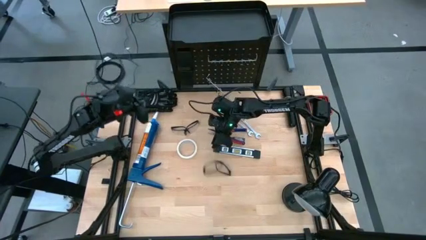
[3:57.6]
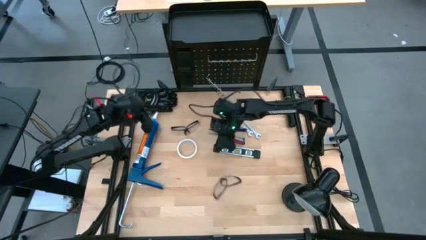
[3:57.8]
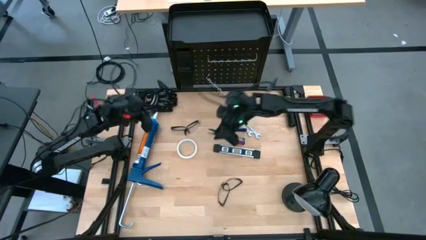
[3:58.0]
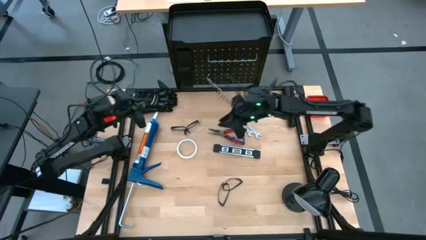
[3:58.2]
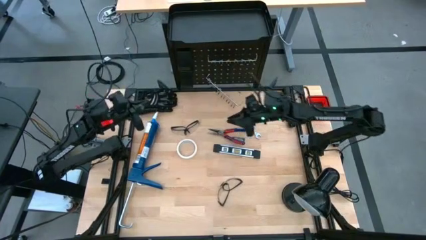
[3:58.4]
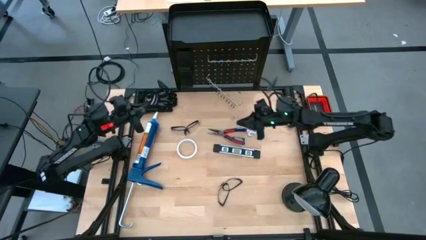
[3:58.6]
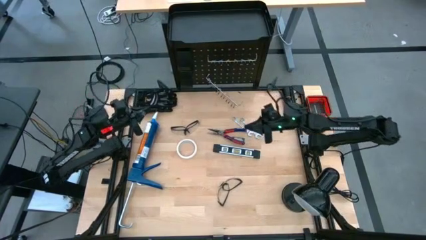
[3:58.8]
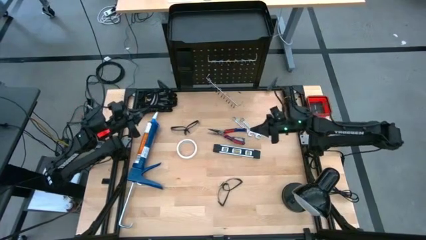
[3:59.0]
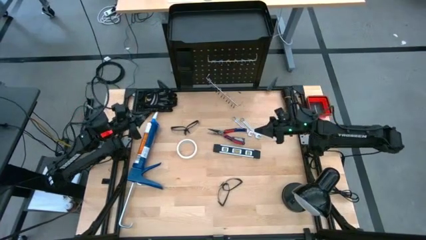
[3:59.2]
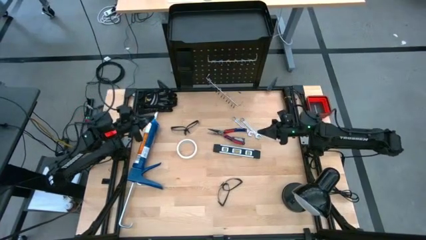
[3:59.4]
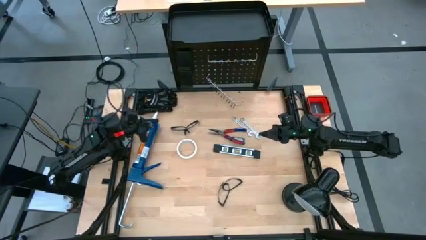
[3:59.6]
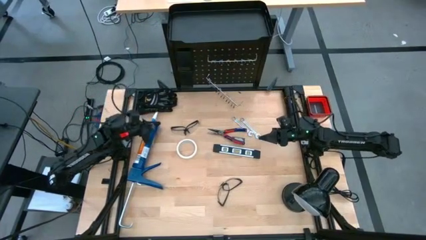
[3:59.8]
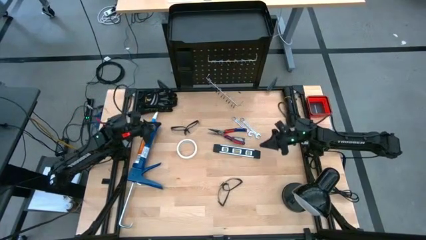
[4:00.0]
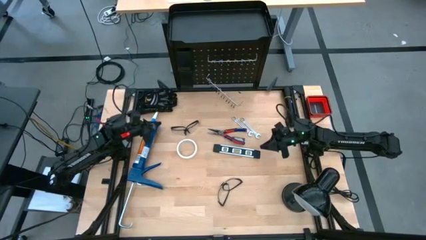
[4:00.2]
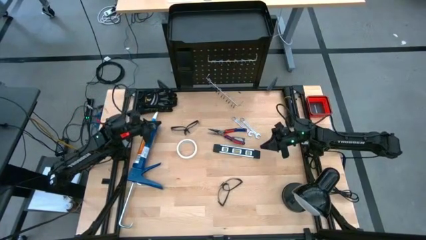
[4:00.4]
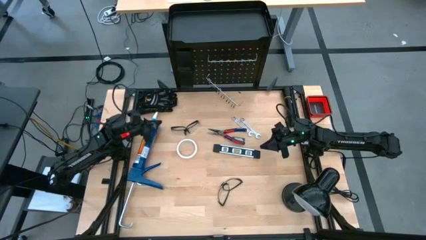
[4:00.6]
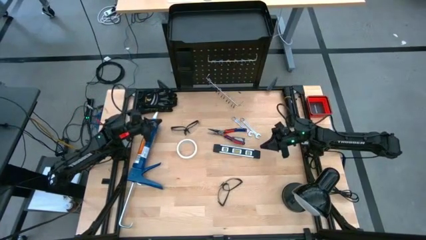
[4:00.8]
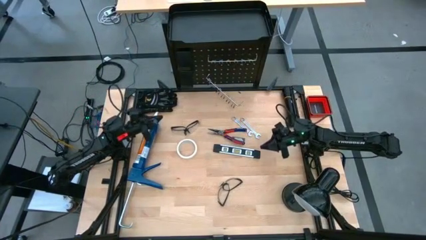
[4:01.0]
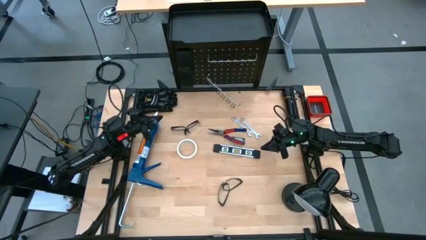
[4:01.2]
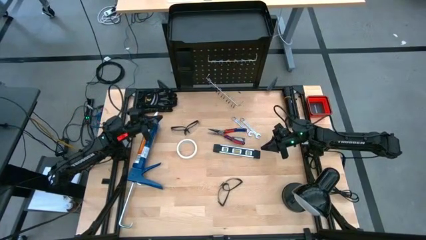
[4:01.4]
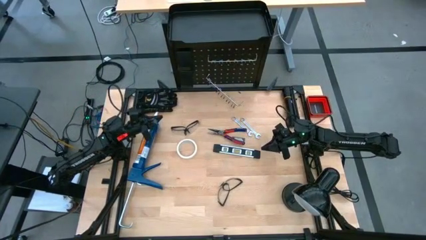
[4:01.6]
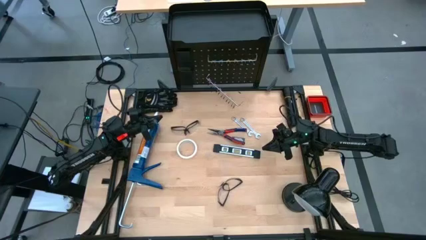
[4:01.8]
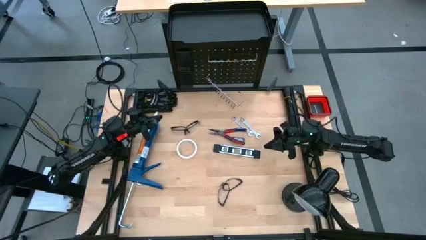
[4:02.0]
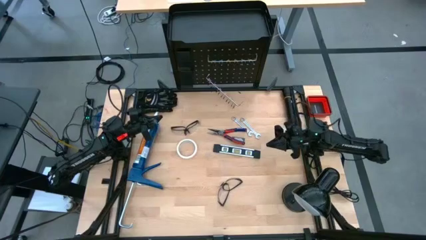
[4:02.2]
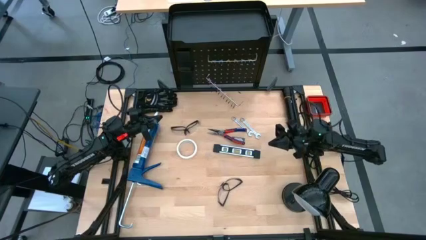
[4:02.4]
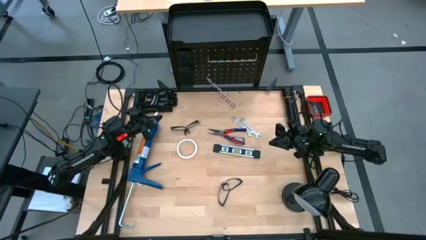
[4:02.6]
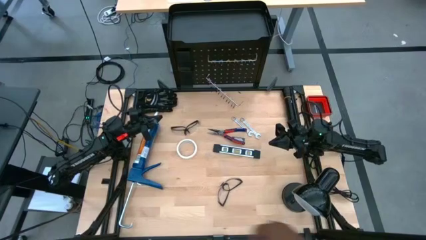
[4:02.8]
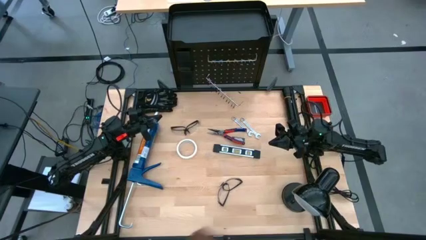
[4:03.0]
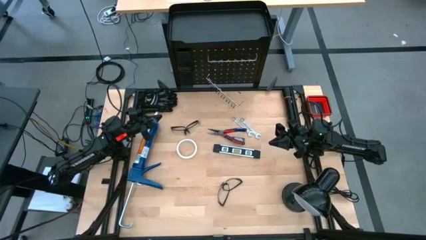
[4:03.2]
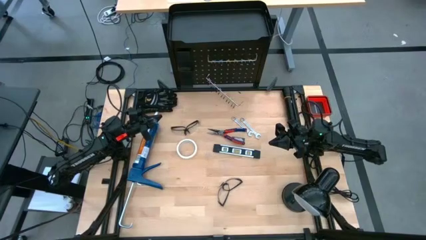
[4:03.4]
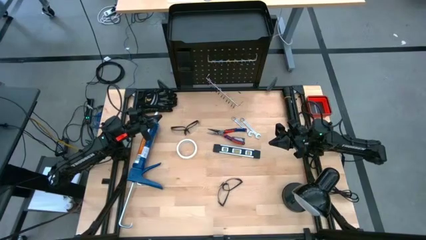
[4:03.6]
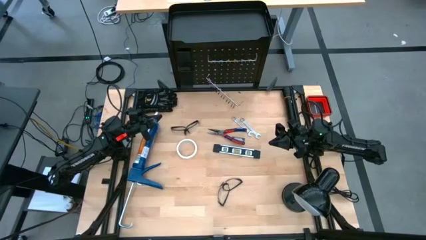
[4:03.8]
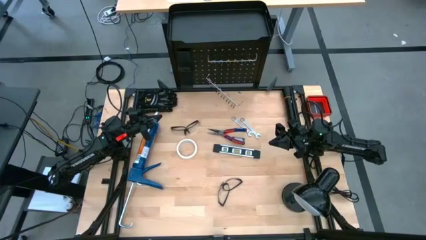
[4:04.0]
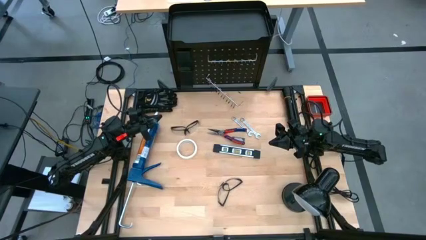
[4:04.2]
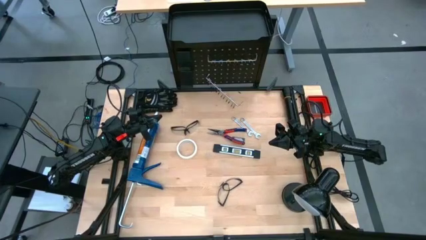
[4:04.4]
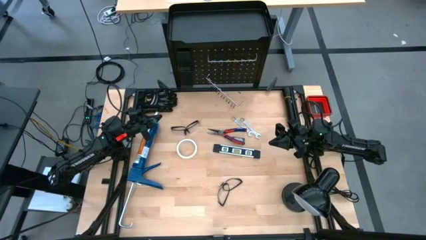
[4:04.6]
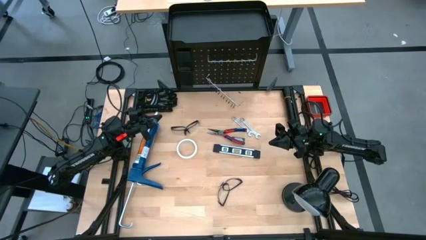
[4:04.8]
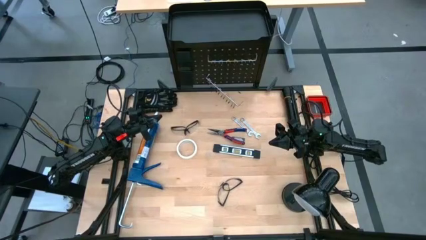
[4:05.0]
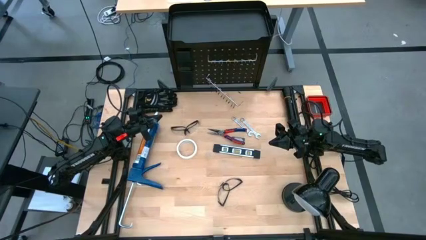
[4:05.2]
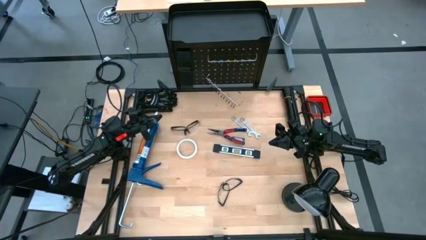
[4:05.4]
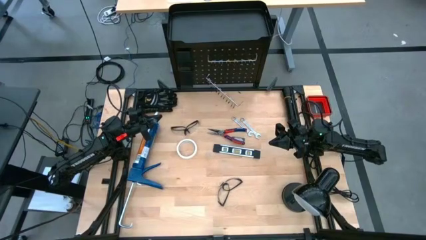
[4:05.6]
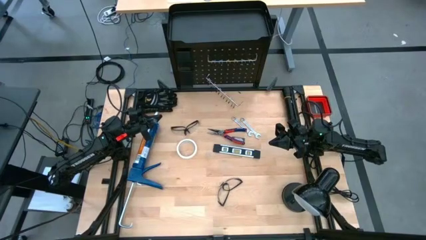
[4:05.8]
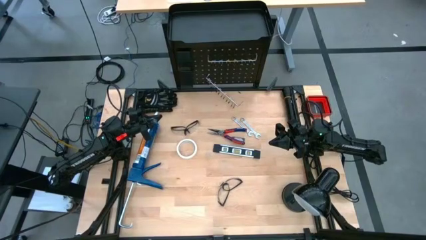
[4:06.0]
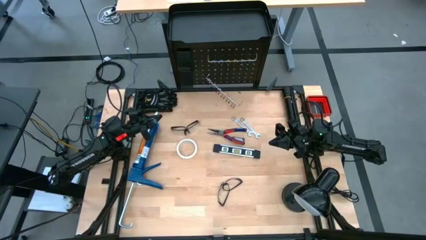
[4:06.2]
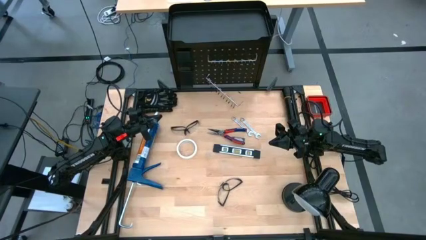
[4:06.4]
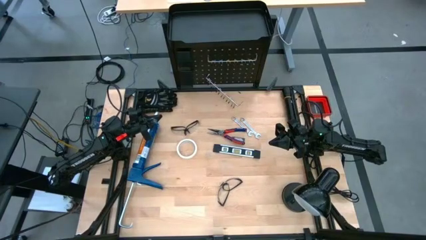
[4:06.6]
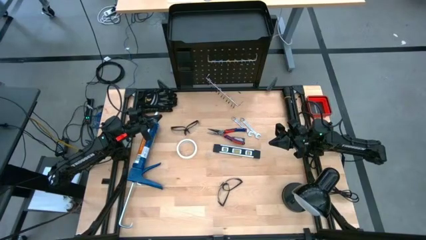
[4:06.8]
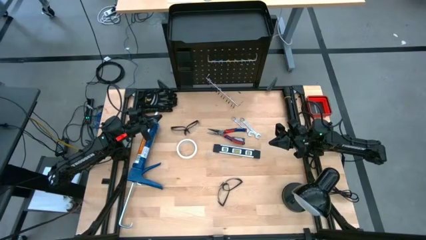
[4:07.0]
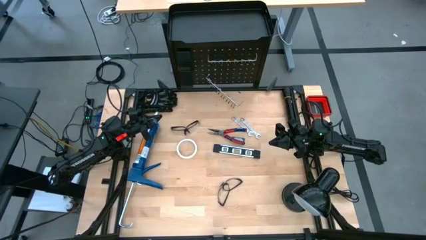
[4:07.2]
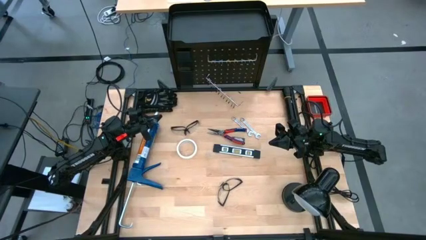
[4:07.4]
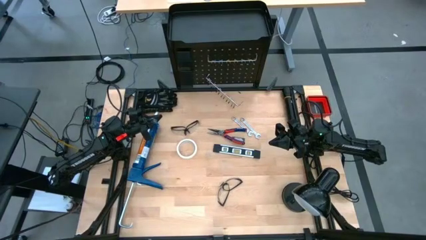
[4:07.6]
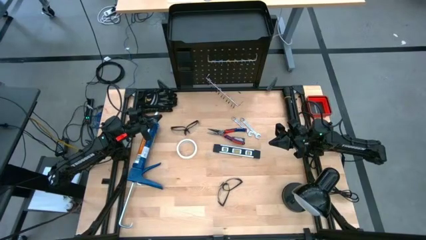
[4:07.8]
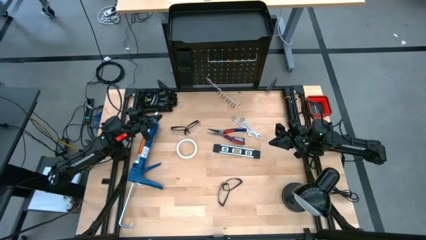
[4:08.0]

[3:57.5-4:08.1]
Task: Hang tools onto peg board
Return to Home Position

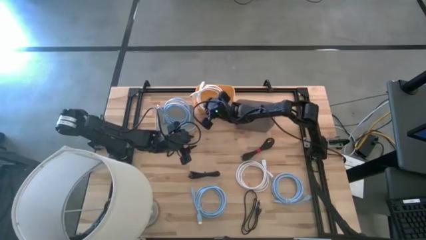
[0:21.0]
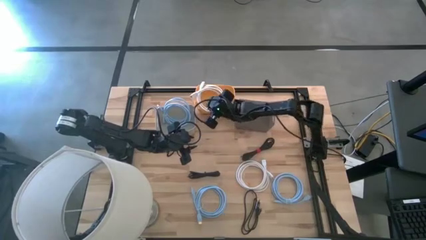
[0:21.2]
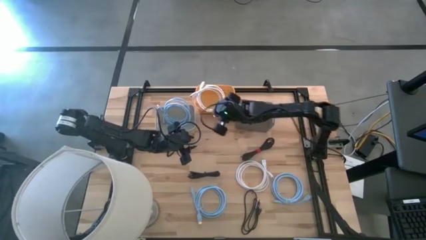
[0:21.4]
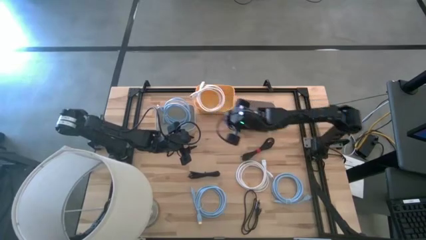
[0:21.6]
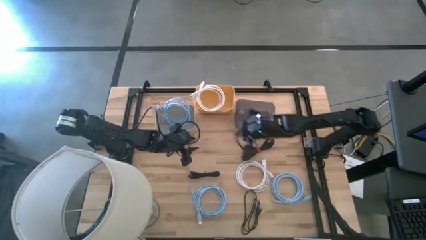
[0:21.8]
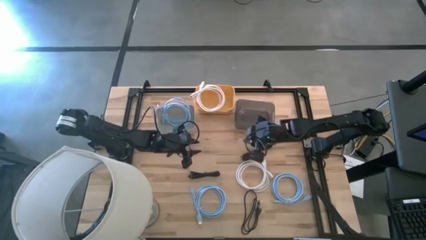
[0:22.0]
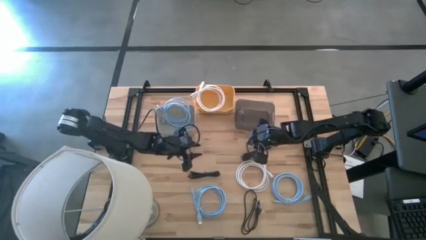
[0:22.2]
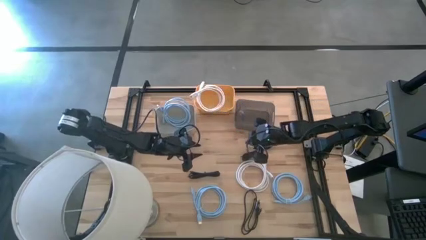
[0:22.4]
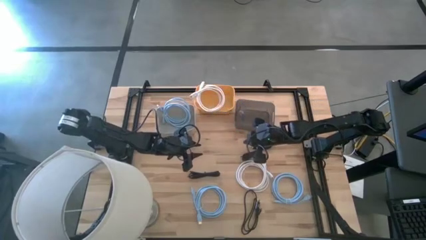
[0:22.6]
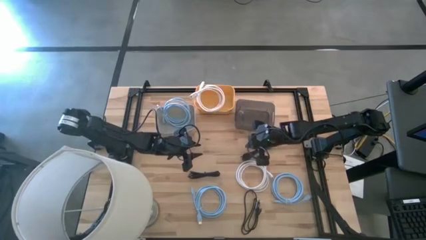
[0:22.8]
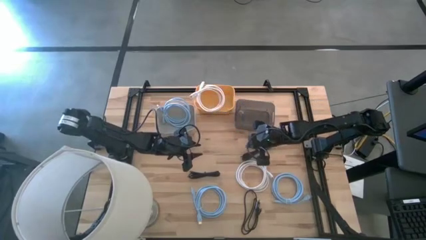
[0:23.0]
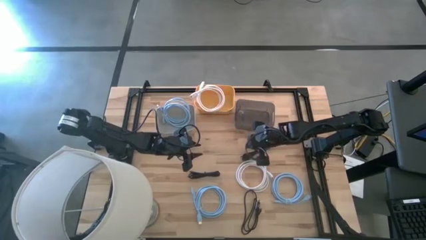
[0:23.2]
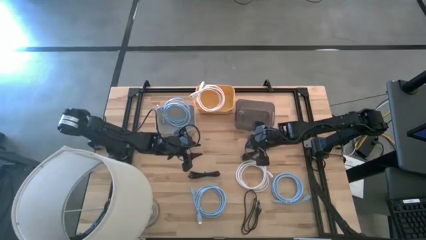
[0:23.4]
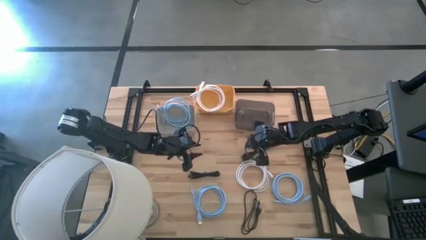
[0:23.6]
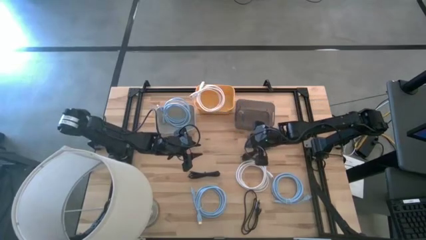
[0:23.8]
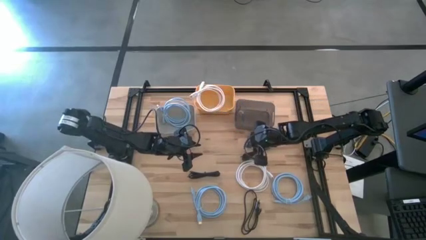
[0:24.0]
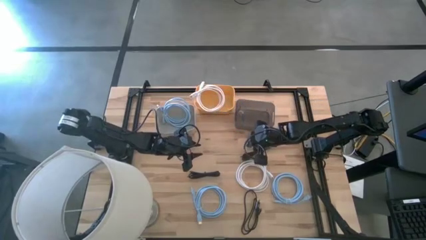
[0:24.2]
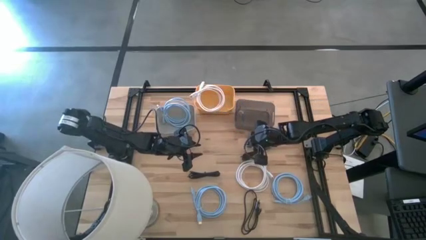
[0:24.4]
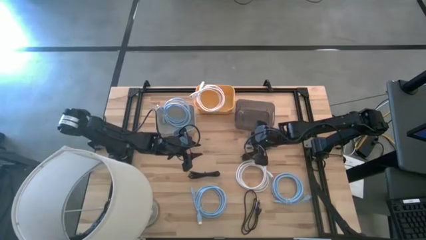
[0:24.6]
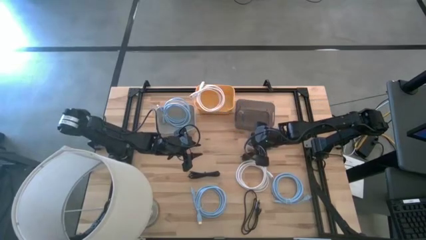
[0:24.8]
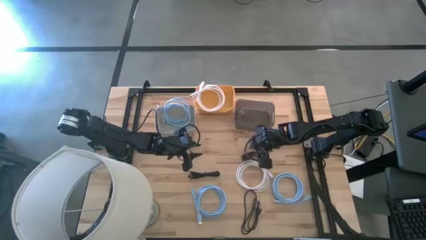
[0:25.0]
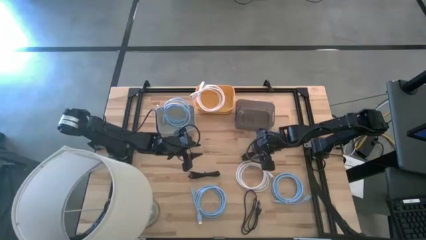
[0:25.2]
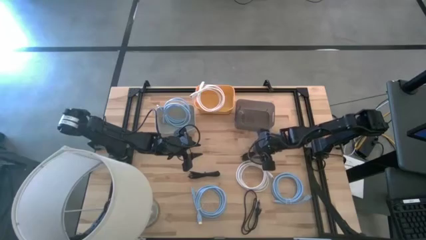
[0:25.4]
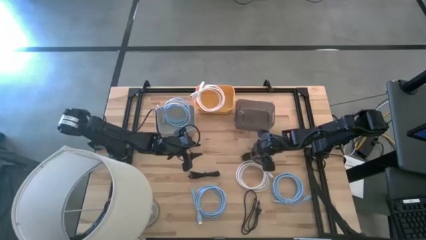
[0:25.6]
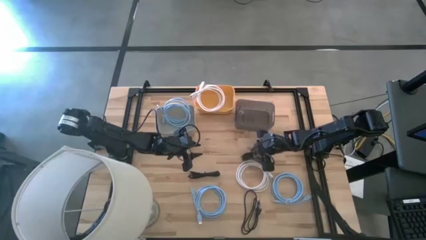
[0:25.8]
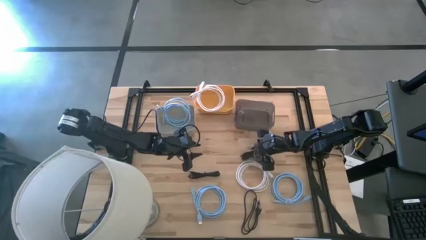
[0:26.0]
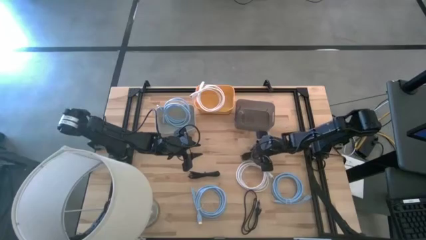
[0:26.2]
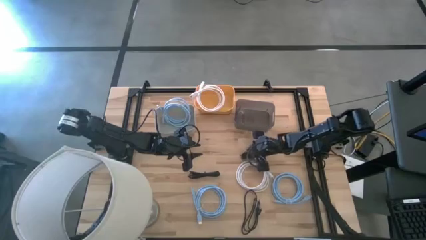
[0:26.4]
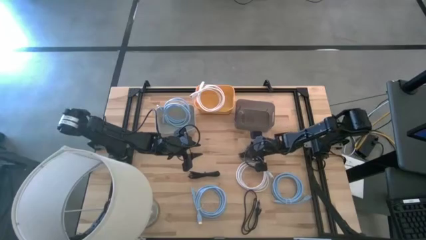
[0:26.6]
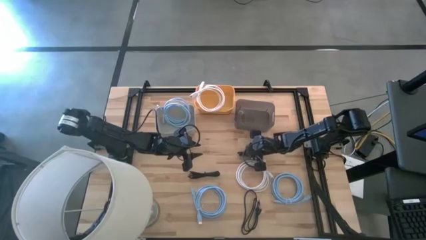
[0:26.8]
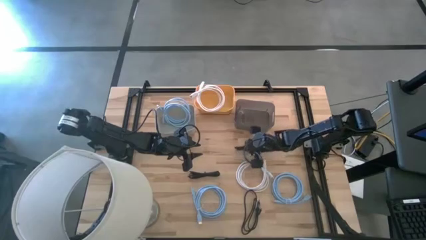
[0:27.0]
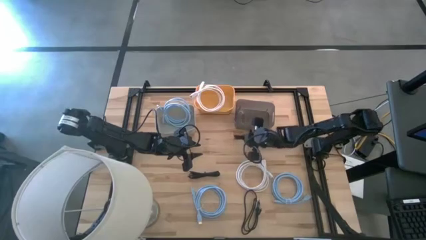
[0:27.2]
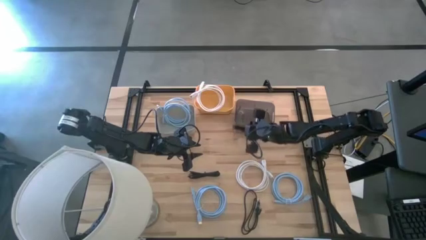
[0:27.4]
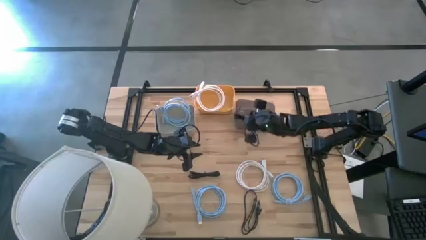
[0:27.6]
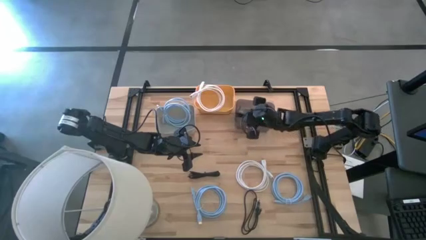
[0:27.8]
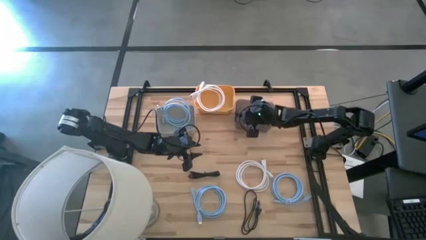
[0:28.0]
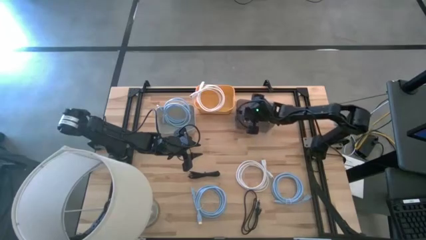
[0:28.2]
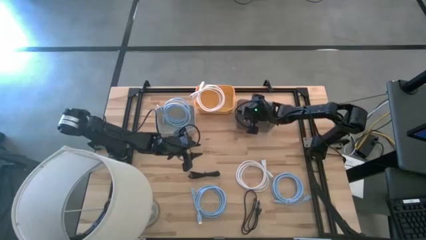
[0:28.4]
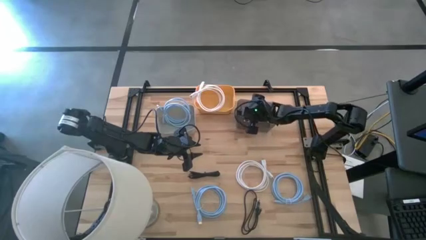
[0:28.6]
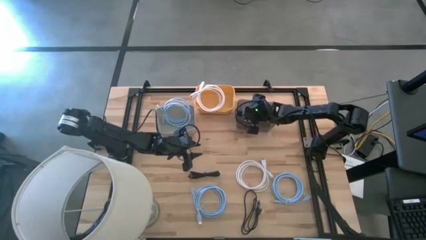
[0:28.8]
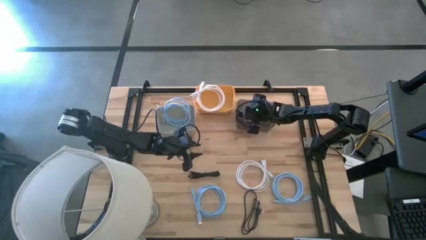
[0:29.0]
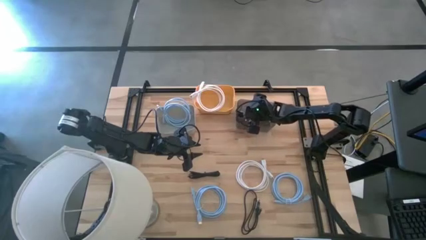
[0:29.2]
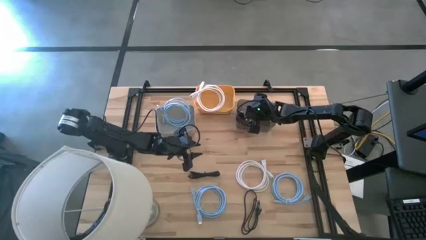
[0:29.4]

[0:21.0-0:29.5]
Task: Pick & Place USB Port
Put the top black charger cable into the black bin
